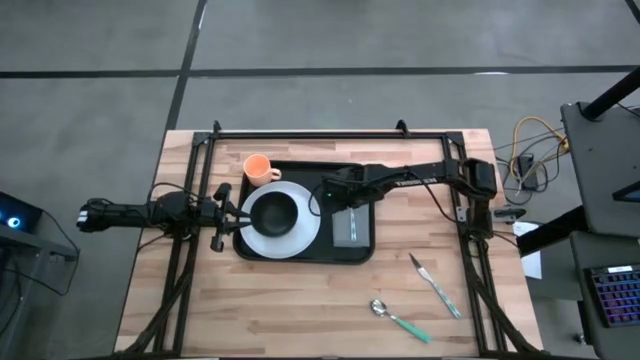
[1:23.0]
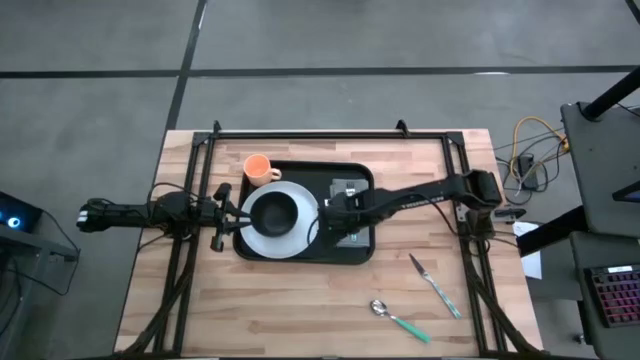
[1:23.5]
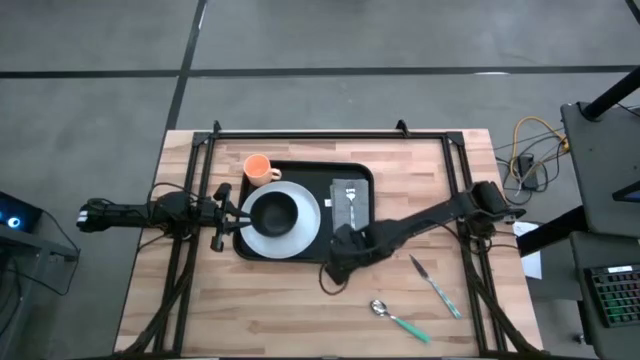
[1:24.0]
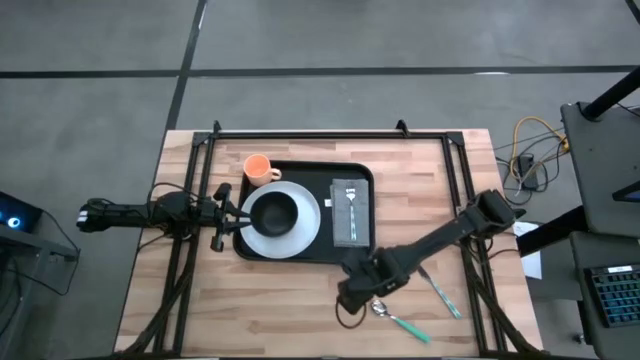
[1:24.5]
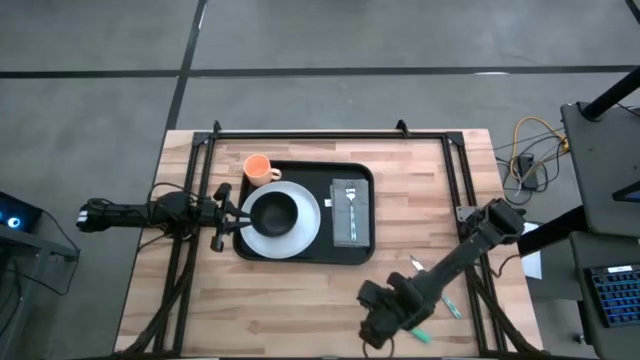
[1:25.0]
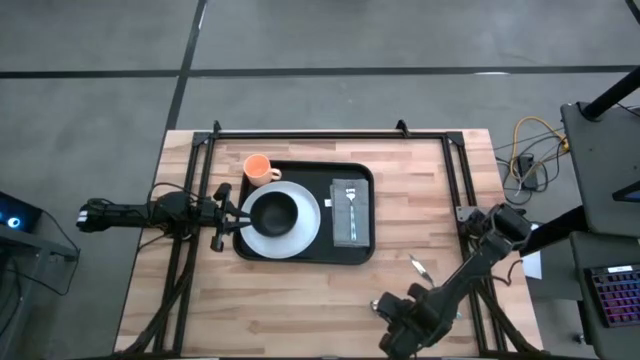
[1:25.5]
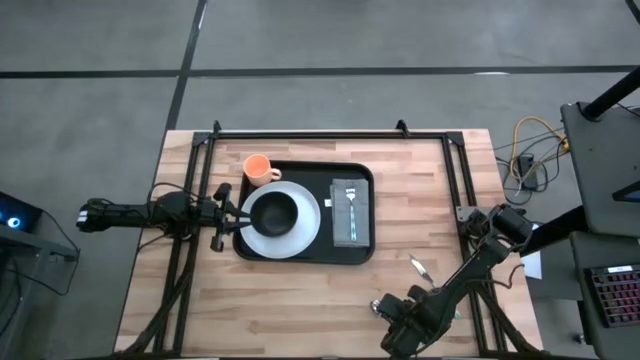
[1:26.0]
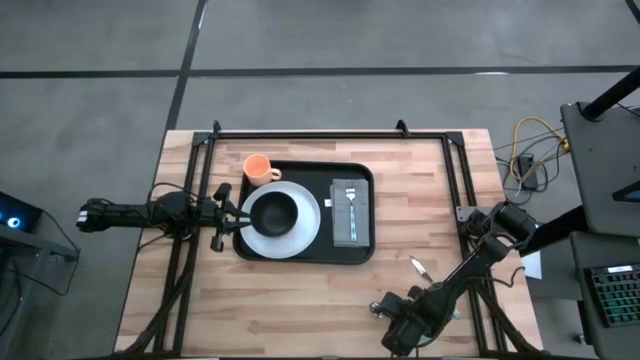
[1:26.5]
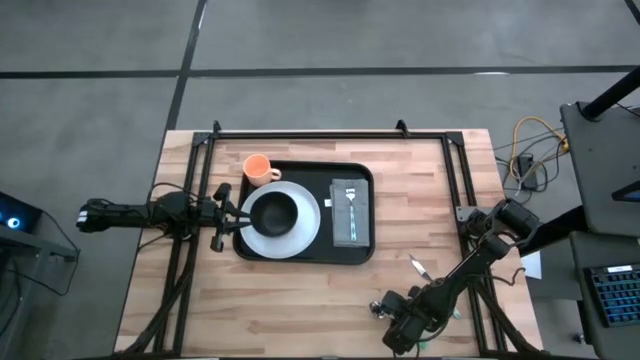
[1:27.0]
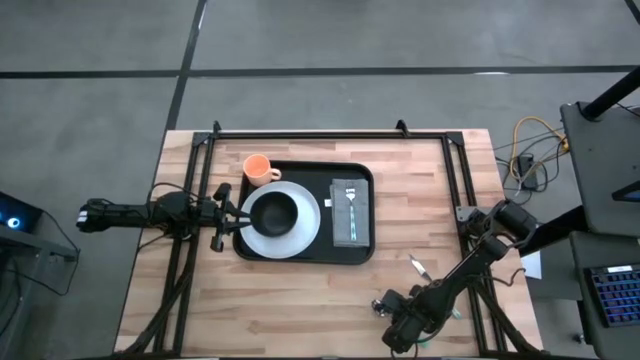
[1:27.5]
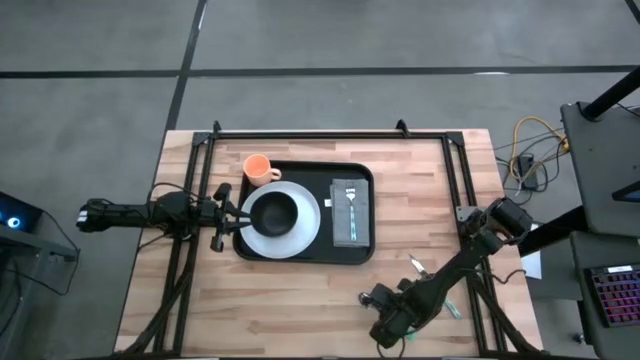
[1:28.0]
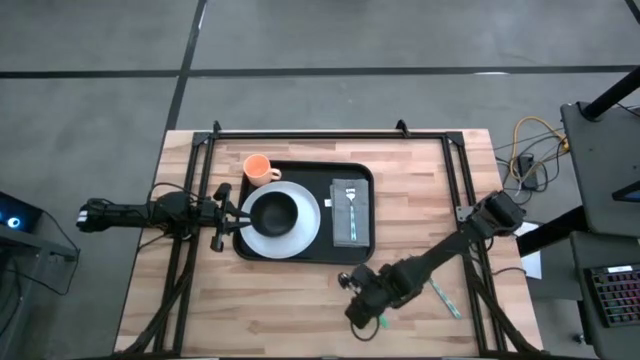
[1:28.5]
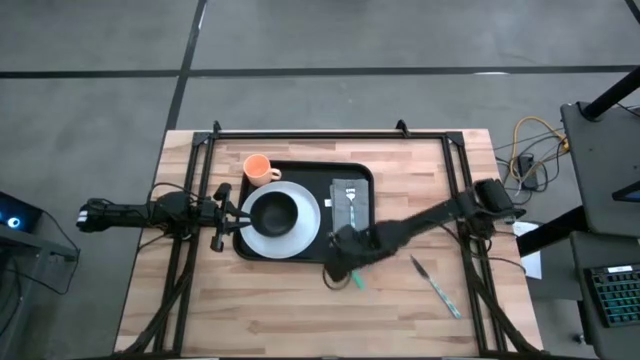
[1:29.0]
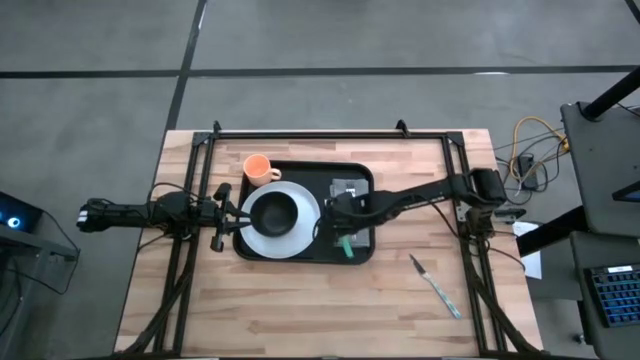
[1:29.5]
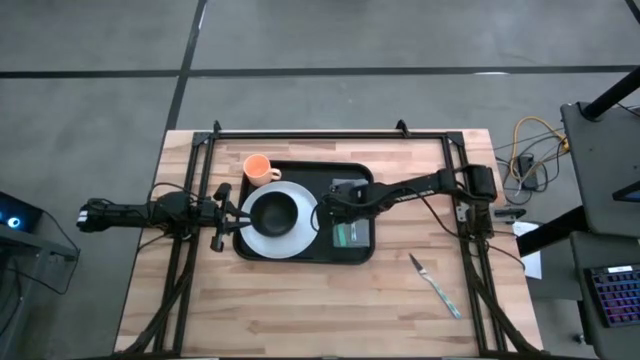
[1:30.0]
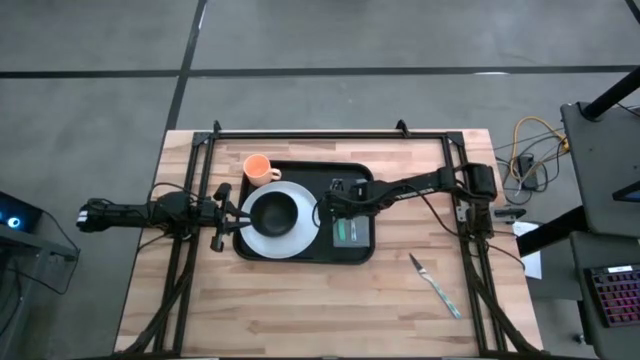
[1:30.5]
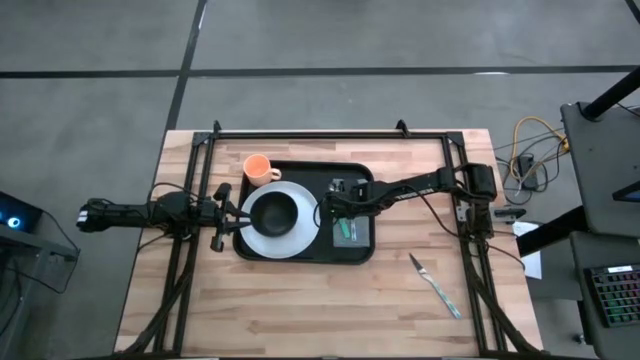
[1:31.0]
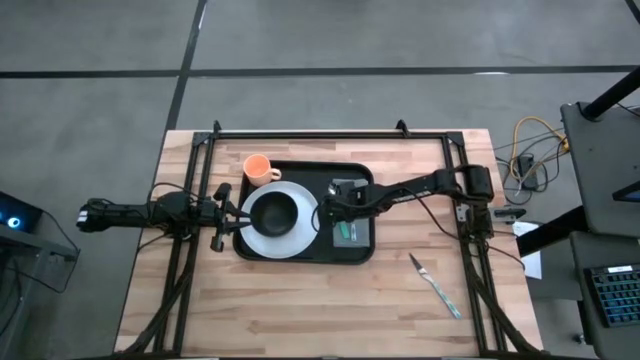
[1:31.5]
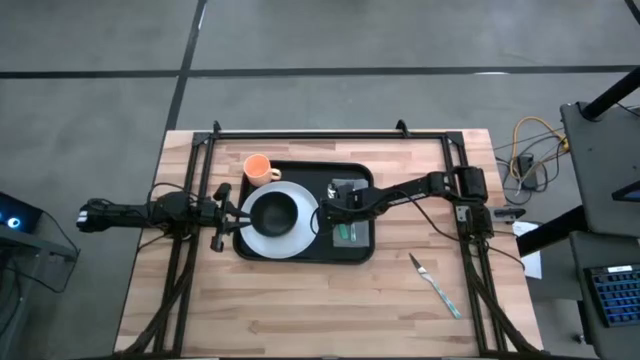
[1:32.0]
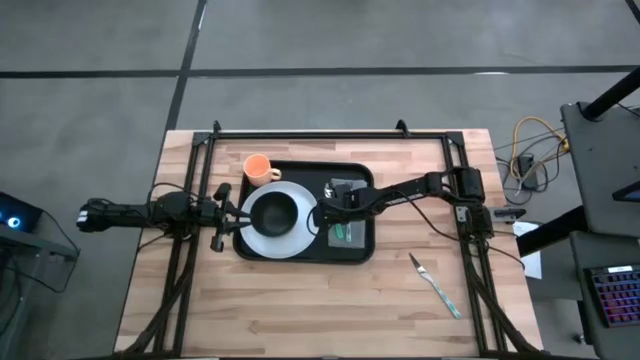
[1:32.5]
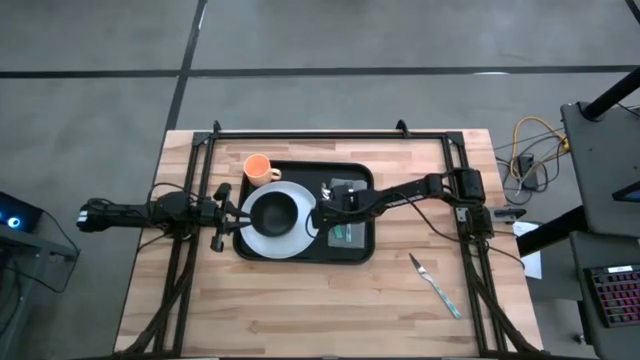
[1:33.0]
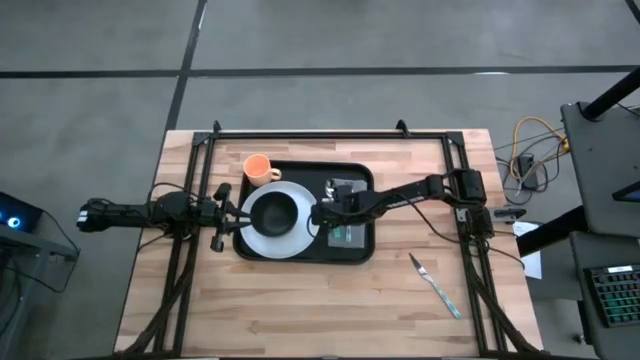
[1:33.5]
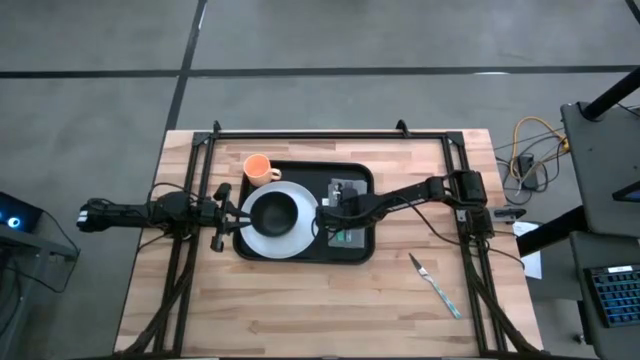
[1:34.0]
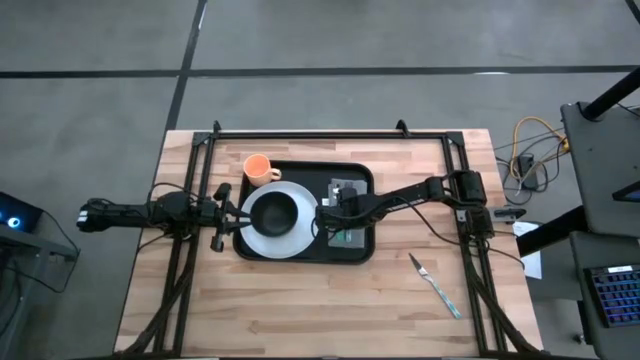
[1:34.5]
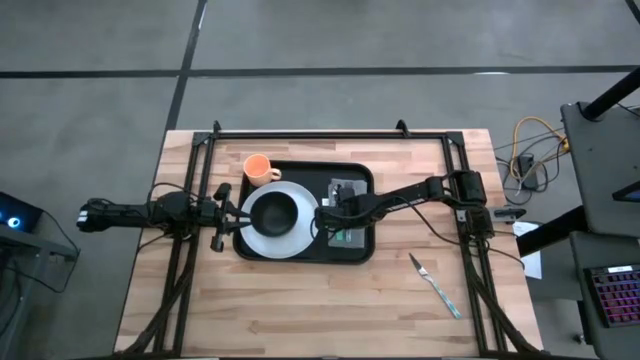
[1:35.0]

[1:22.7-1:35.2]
Task: Set up tray
Put the blue spoon on the gray napkin to the left of the white and blue fork

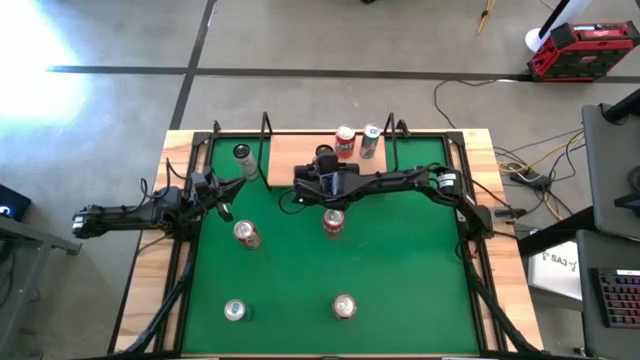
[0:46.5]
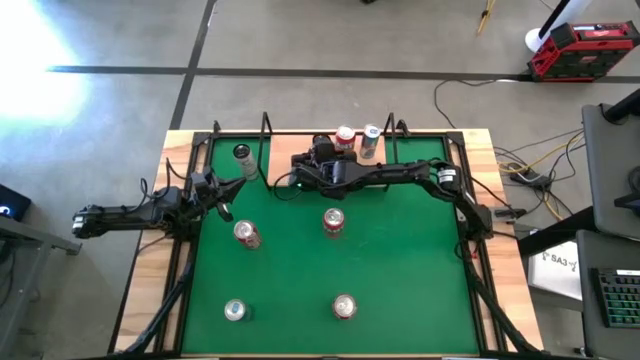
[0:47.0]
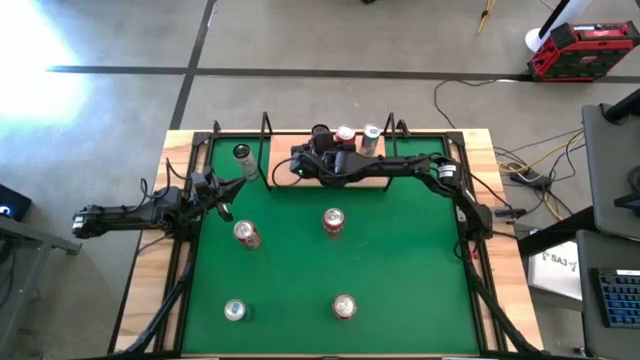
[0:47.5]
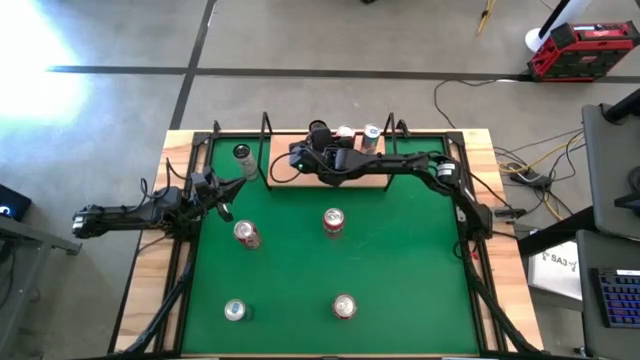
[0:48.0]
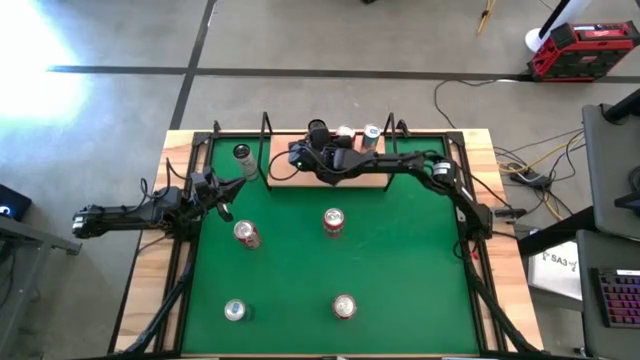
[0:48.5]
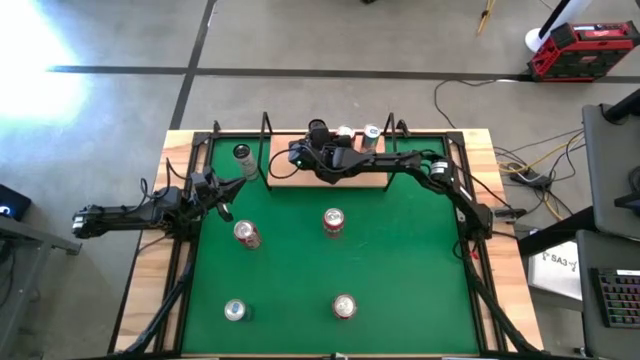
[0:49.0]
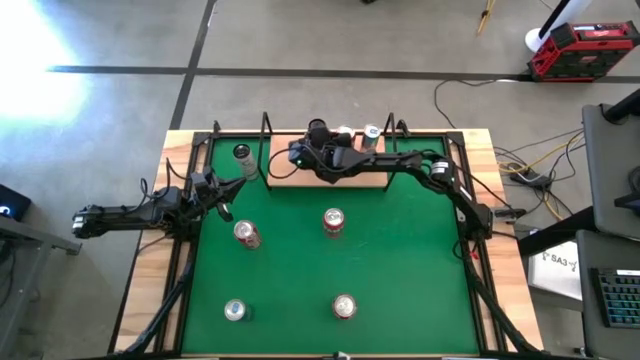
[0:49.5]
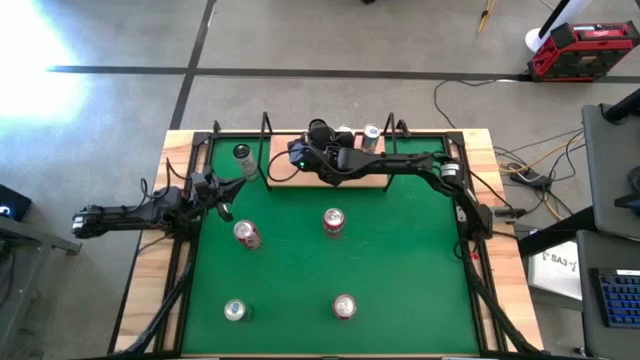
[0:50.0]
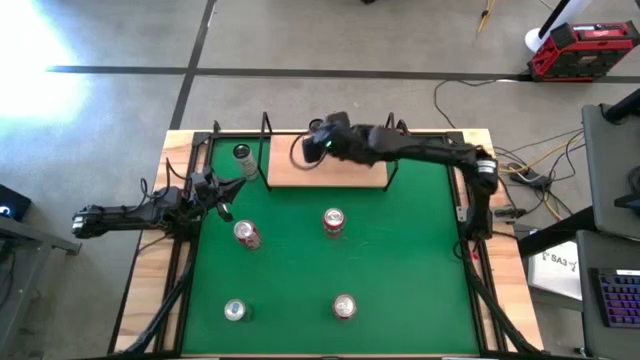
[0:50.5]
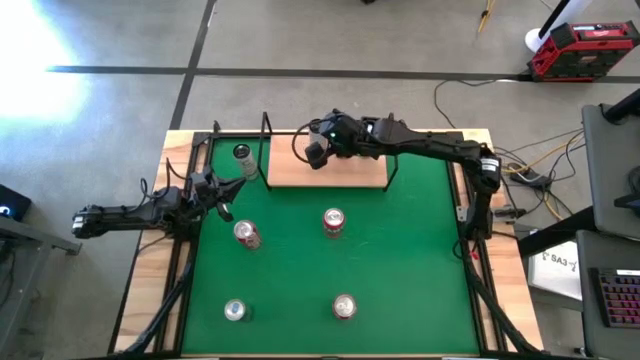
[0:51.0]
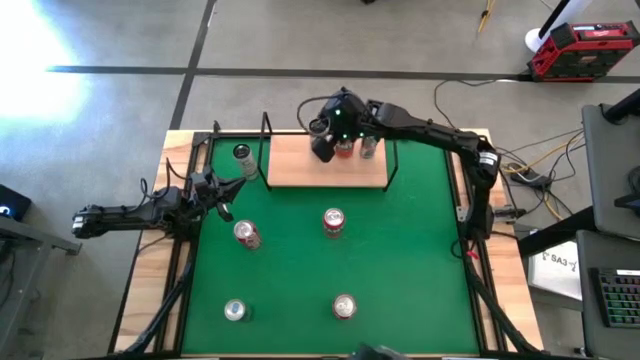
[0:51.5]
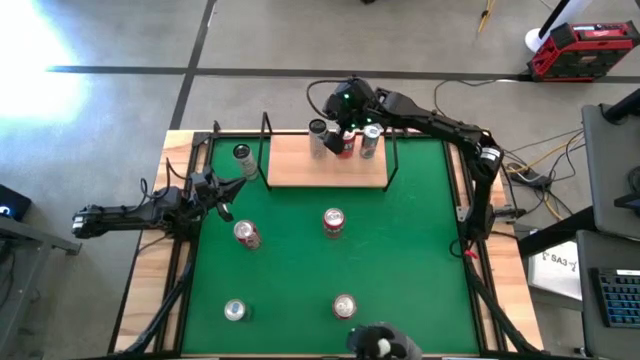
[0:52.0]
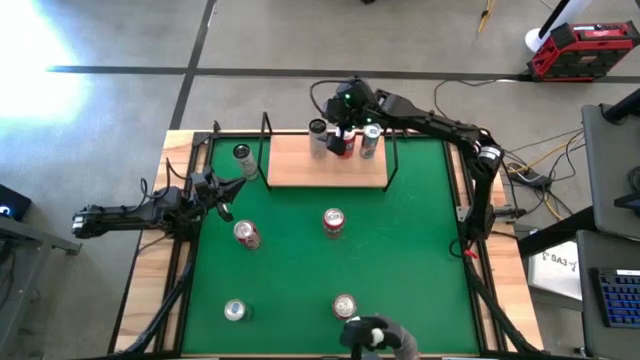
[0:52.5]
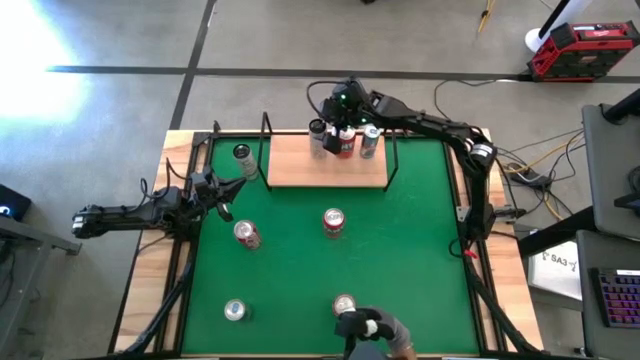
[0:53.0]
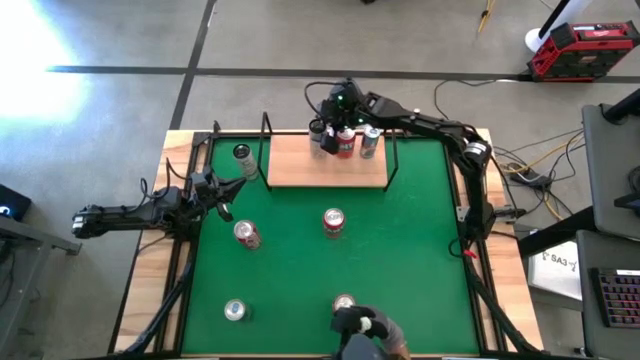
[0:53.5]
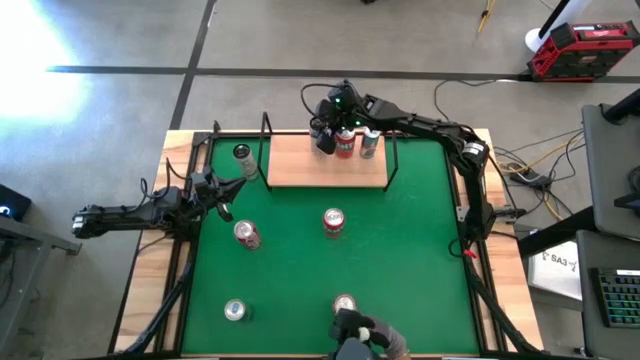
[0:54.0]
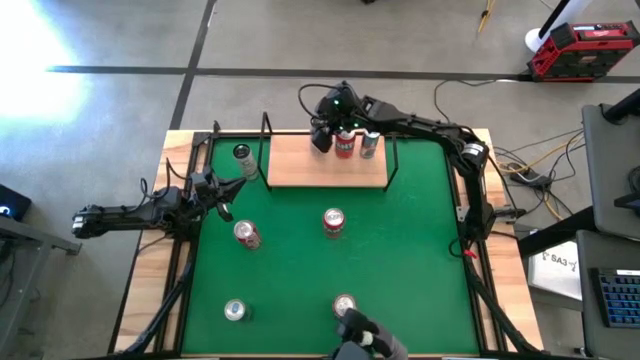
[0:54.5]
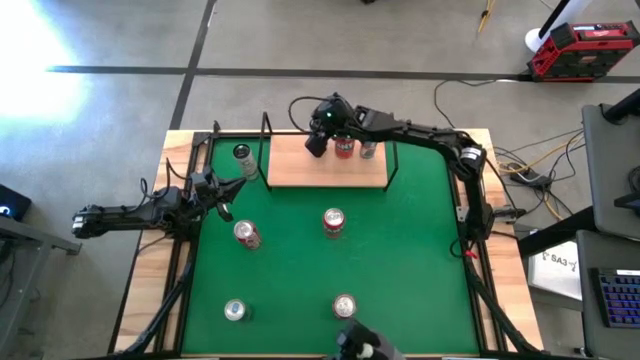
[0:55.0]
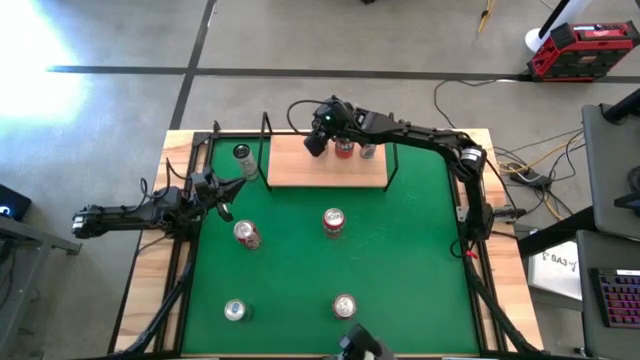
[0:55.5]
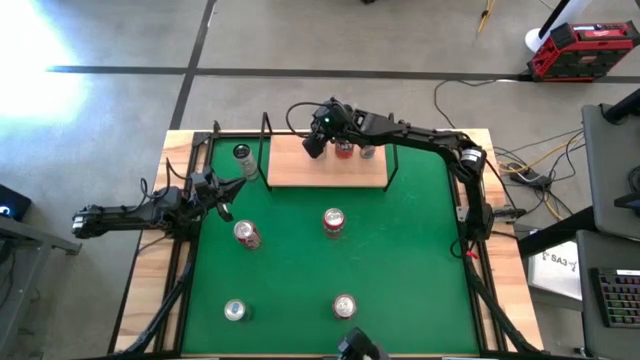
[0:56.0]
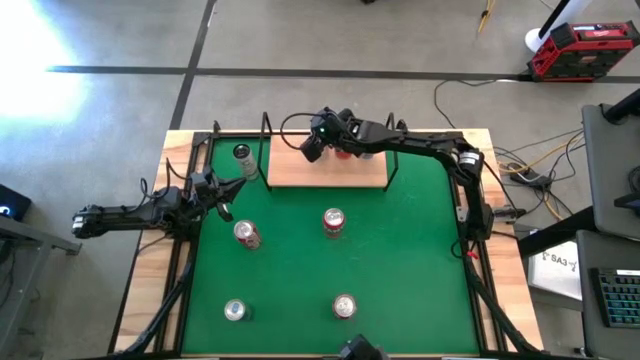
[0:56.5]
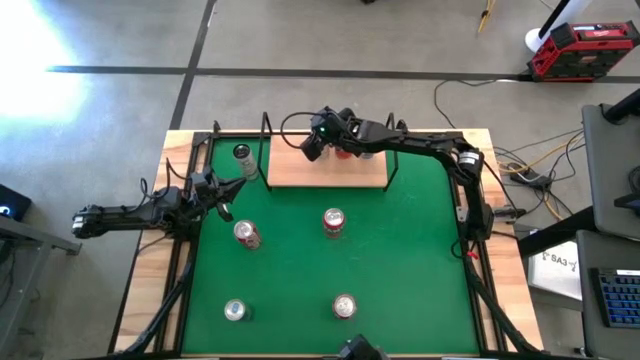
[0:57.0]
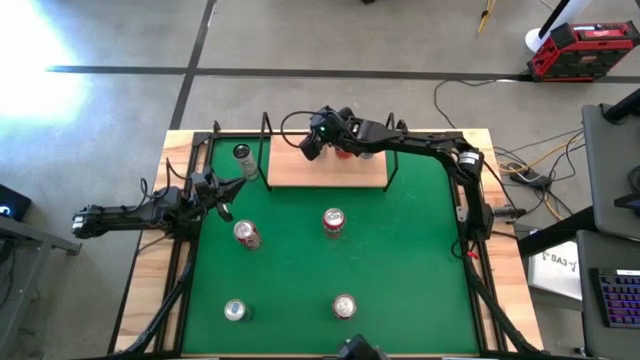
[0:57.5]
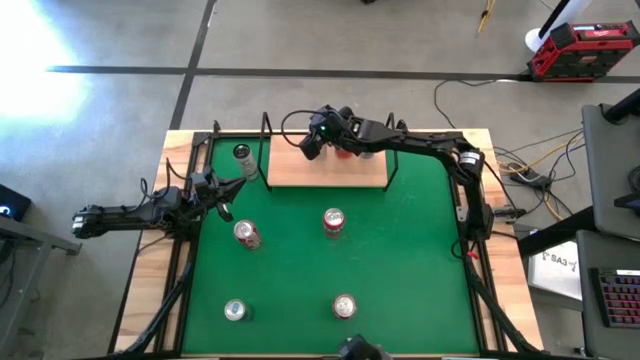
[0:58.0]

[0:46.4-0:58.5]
Task: Place canned beverage on shelf
Put the bottom white-yellow soda can on the shelf
